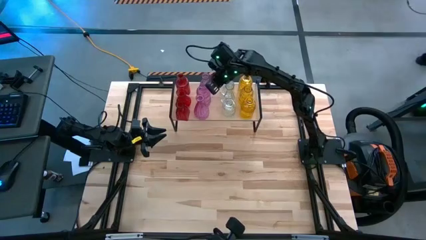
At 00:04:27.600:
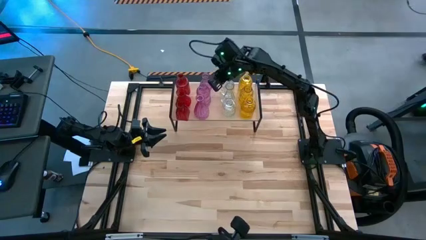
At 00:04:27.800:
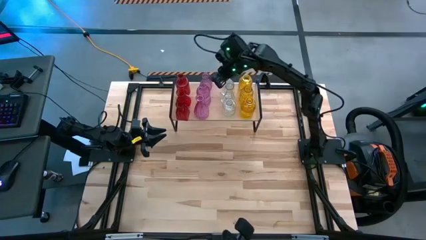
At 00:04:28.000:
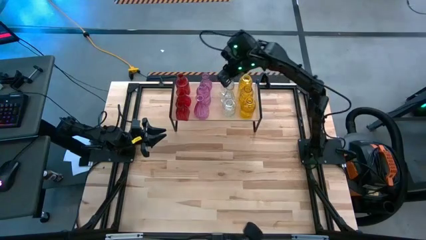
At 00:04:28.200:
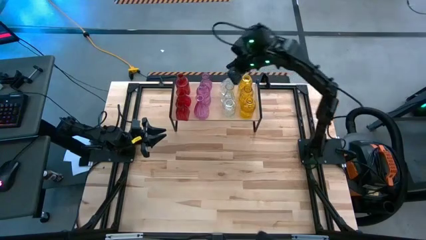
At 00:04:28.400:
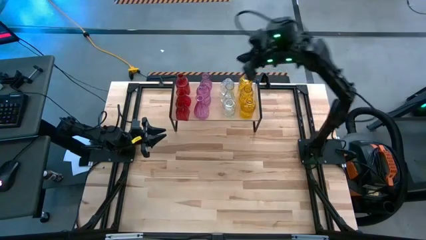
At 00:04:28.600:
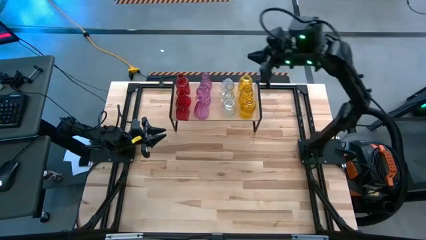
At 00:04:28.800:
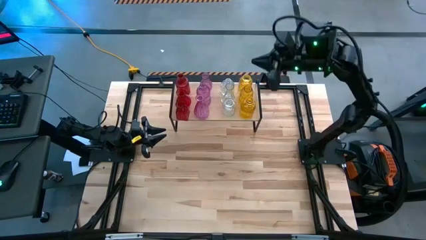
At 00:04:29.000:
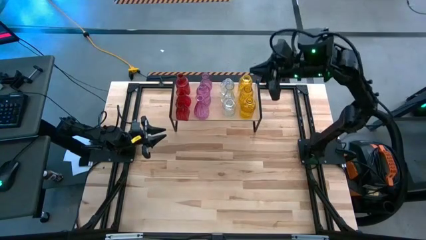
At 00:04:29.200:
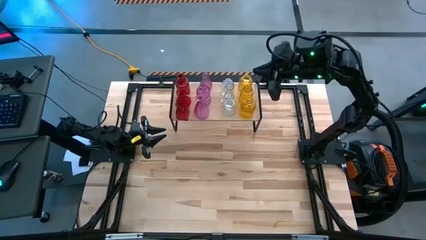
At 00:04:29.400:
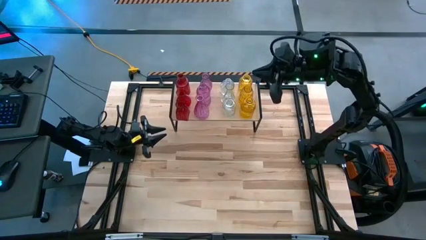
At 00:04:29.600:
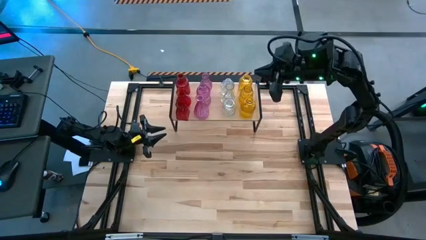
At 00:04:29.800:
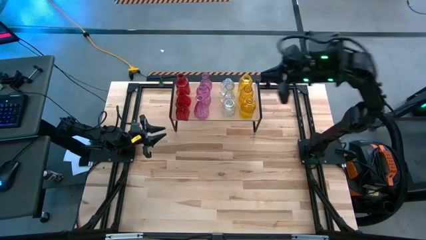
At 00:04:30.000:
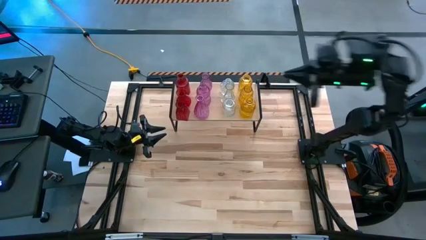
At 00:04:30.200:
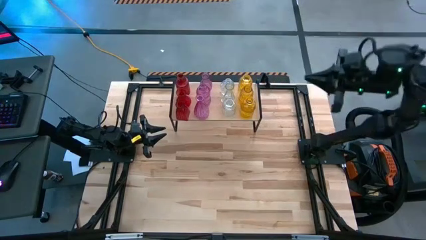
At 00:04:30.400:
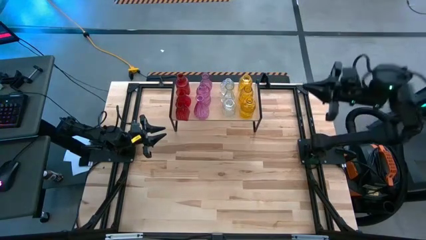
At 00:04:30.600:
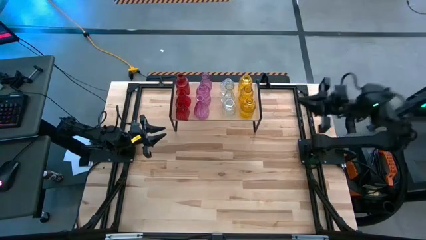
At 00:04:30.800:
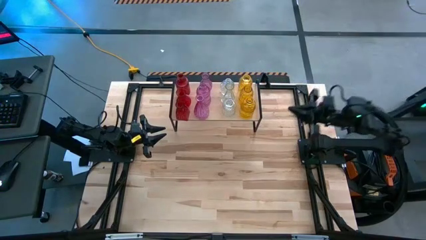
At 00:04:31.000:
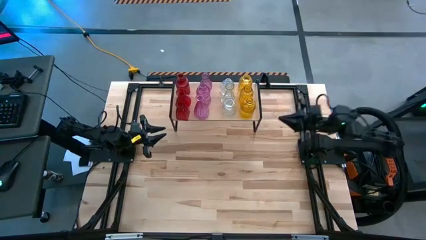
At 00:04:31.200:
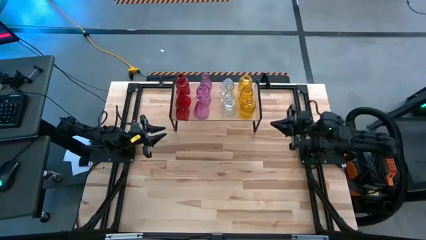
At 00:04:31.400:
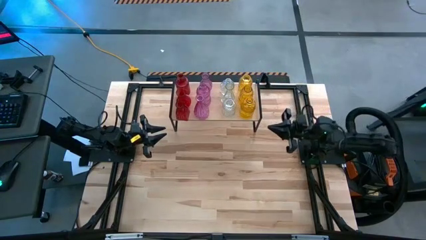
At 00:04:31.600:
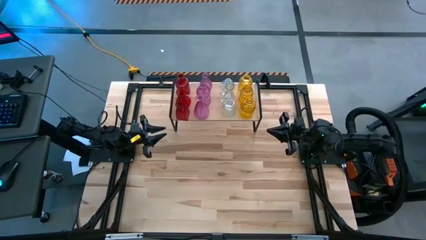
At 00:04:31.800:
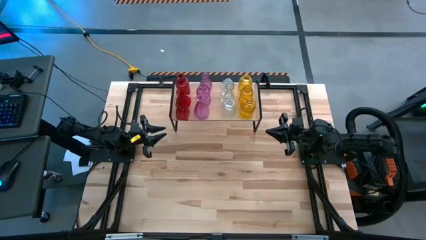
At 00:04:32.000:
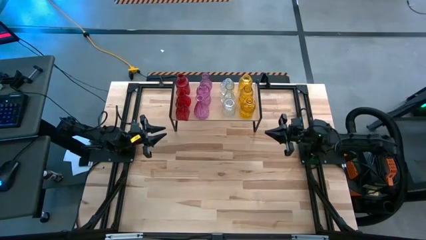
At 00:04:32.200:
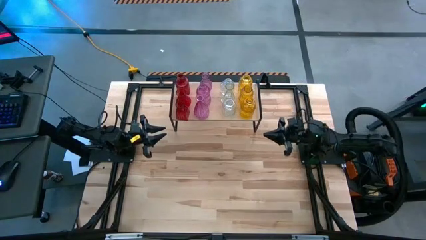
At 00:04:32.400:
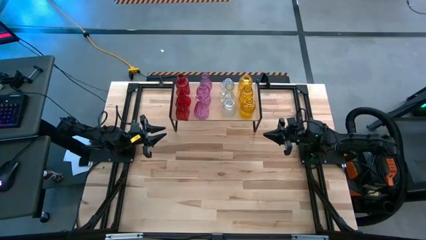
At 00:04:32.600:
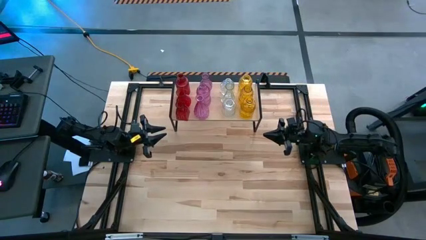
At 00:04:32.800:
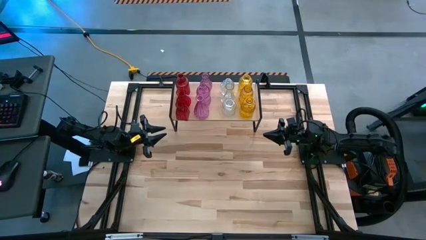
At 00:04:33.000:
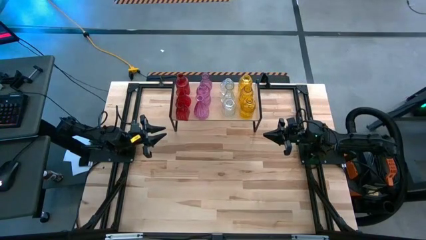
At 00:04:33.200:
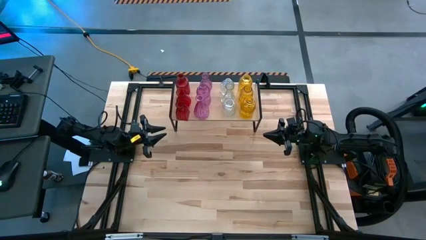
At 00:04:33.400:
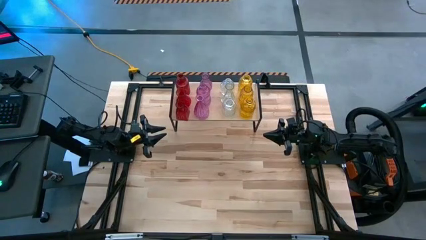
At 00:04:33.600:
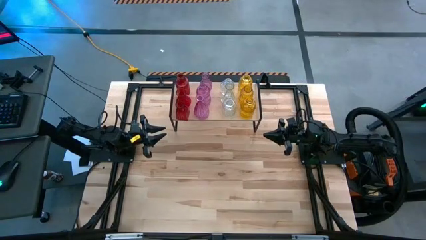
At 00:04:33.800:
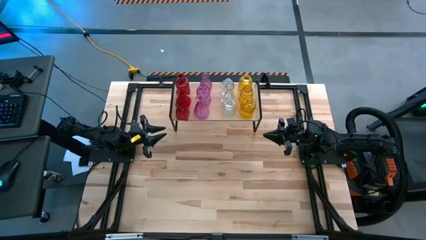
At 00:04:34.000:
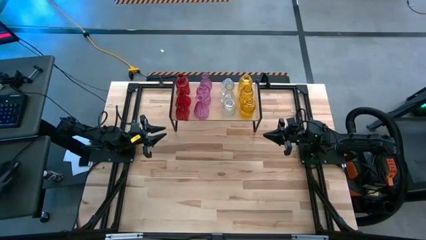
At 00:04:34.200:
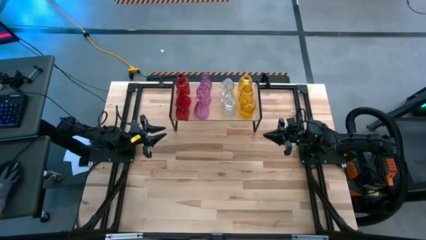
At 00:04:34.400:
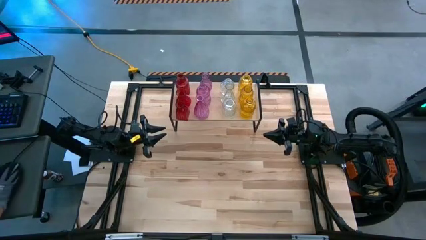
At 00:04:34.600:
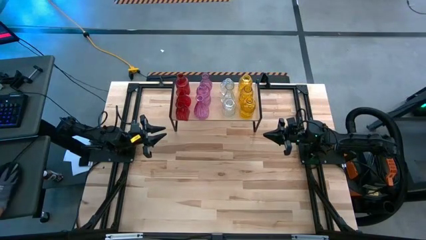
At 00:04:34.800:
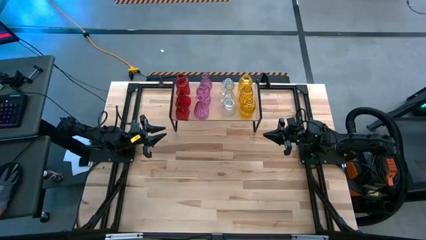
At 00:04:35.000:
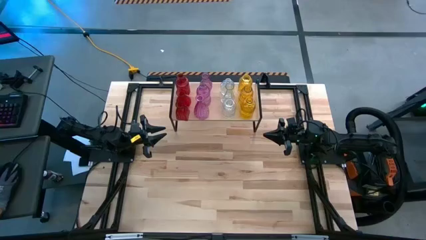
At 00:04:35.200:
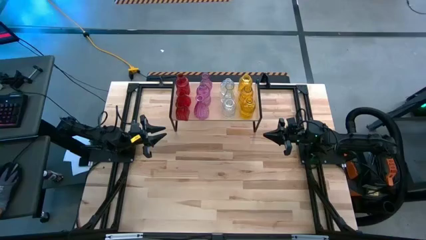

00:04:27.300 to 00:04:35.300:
Task: sort vases onto shelf
Return to Home Position
